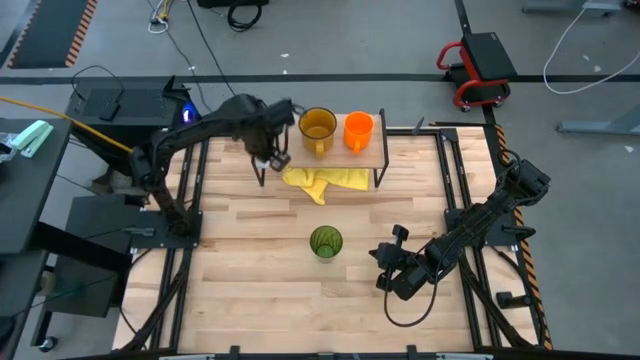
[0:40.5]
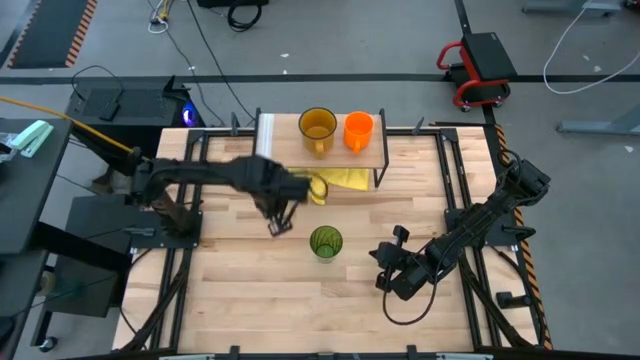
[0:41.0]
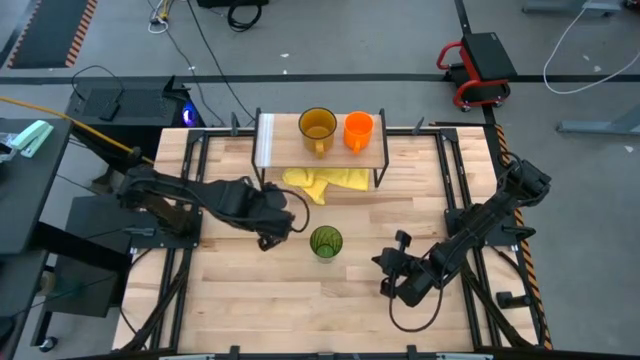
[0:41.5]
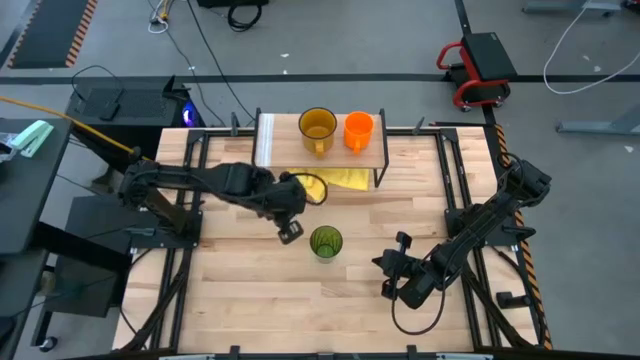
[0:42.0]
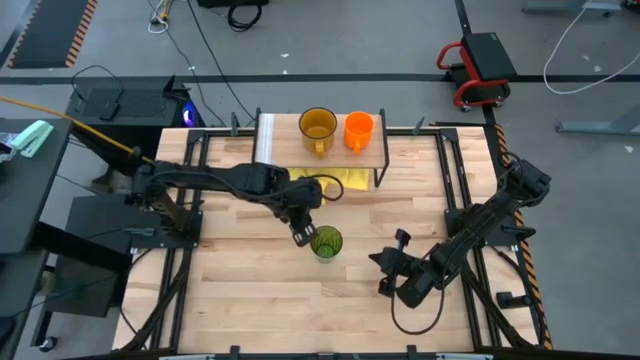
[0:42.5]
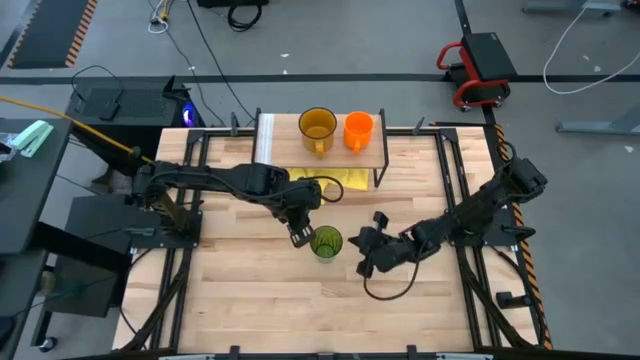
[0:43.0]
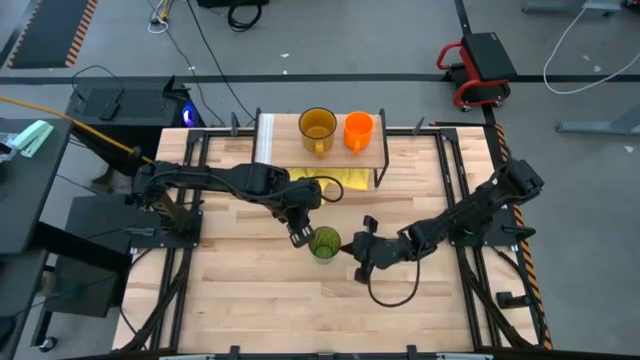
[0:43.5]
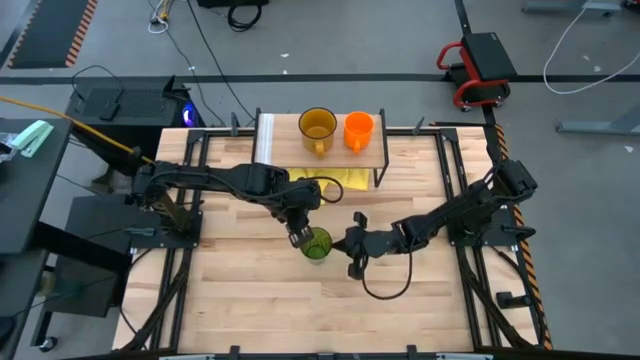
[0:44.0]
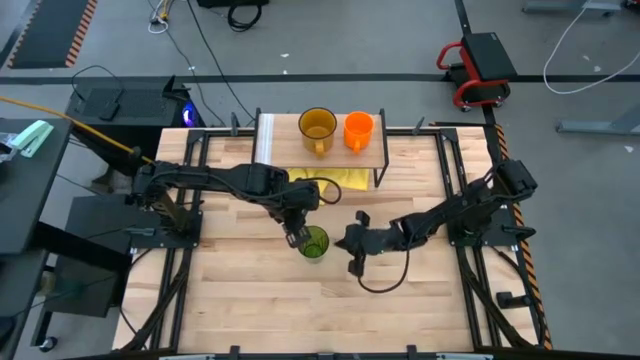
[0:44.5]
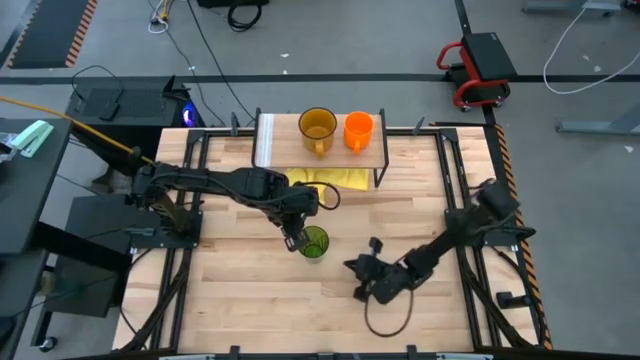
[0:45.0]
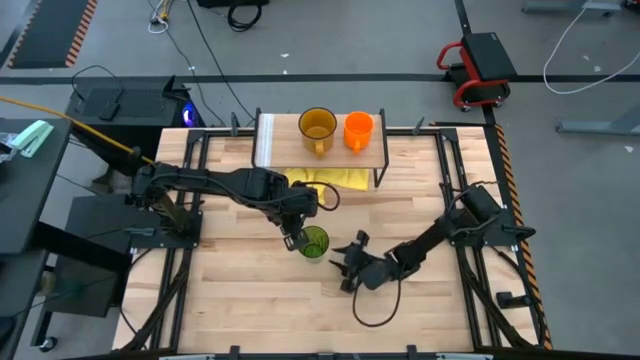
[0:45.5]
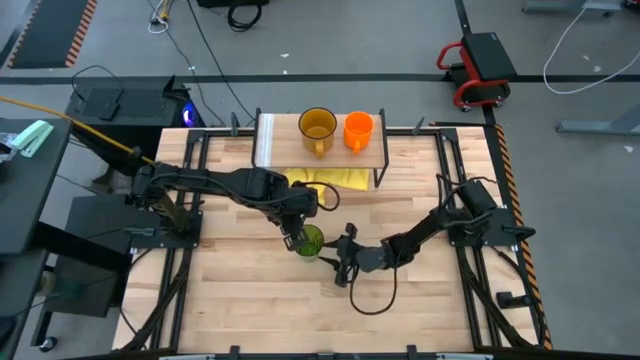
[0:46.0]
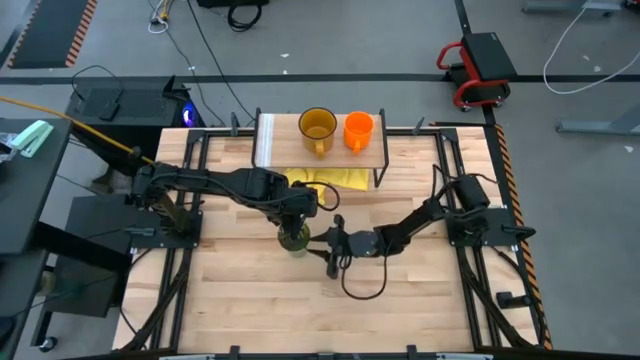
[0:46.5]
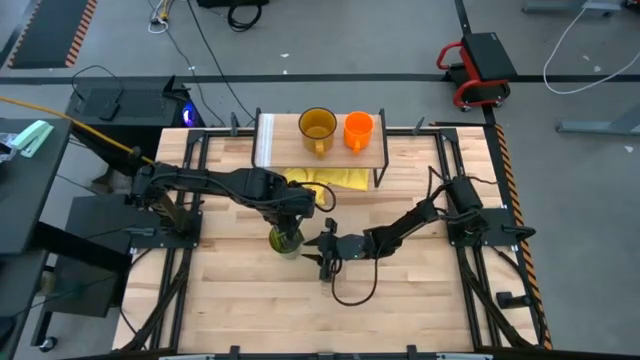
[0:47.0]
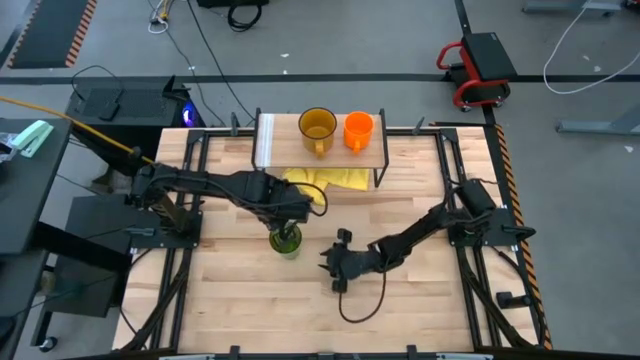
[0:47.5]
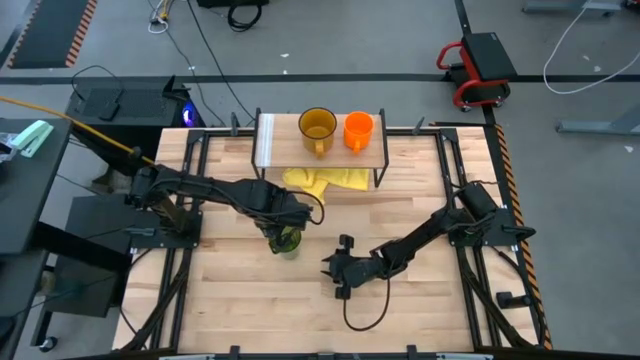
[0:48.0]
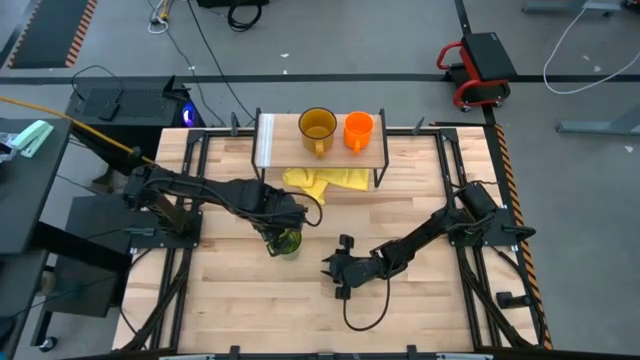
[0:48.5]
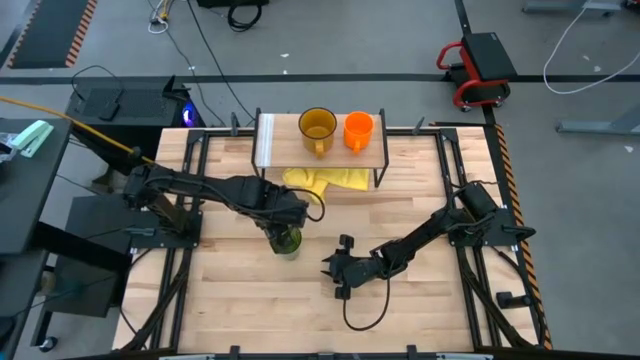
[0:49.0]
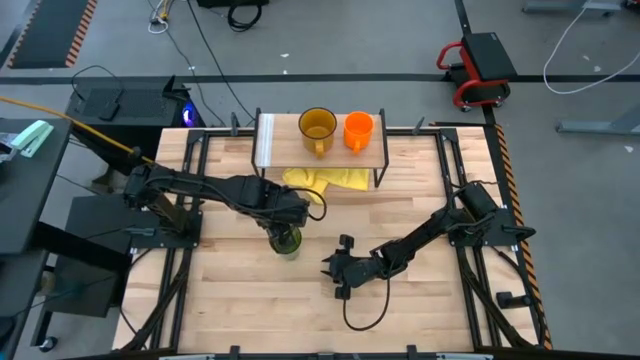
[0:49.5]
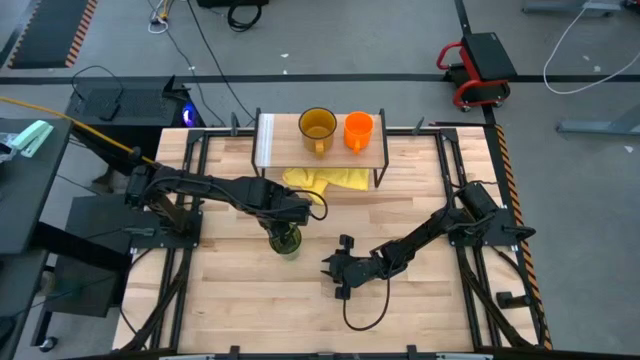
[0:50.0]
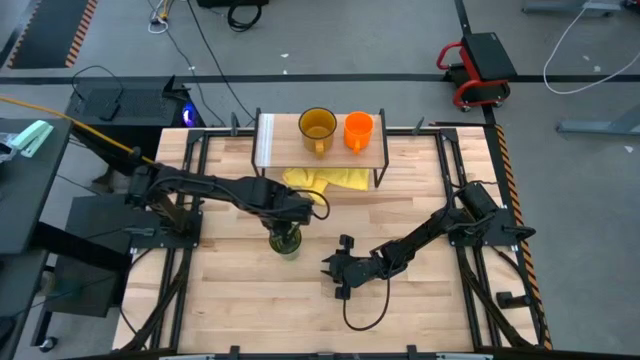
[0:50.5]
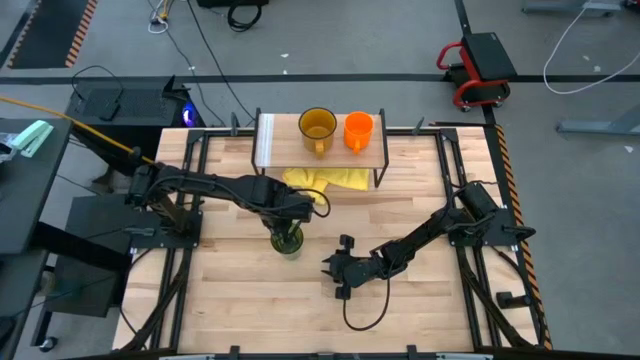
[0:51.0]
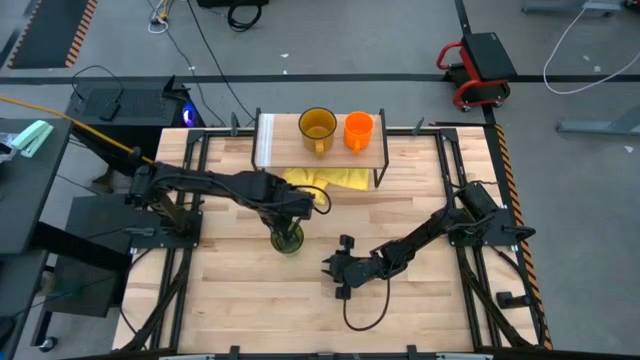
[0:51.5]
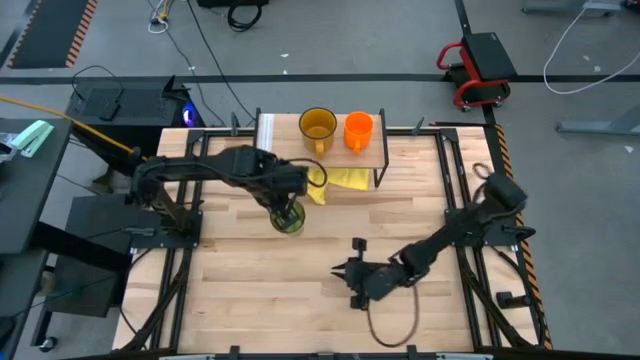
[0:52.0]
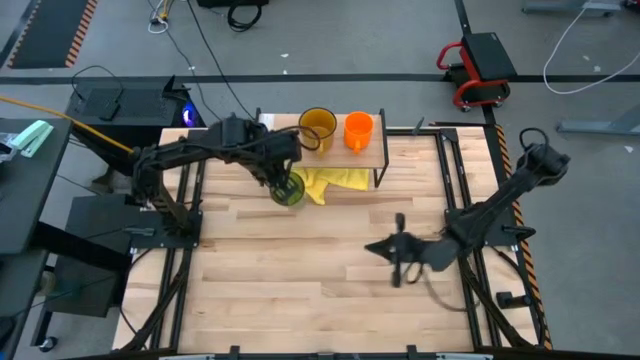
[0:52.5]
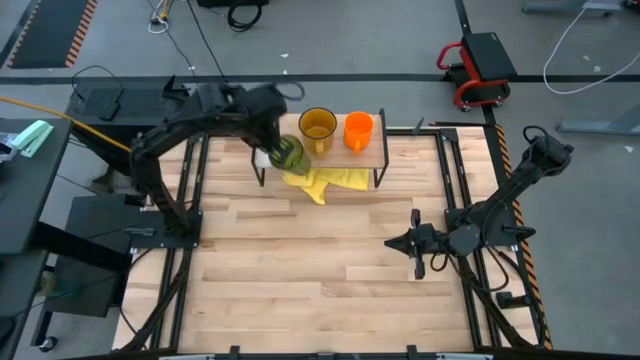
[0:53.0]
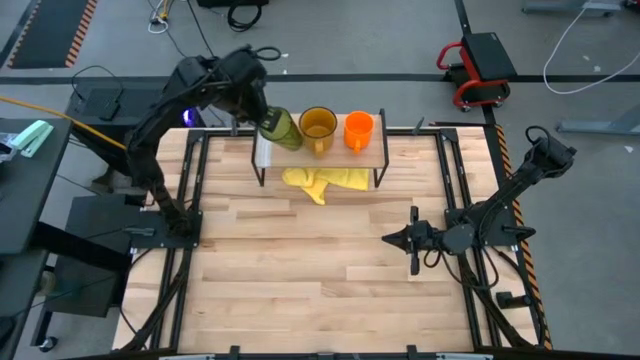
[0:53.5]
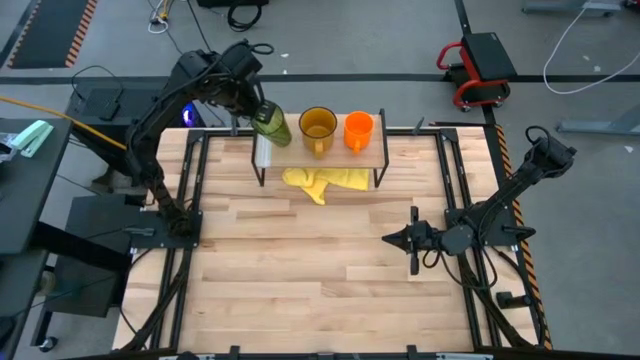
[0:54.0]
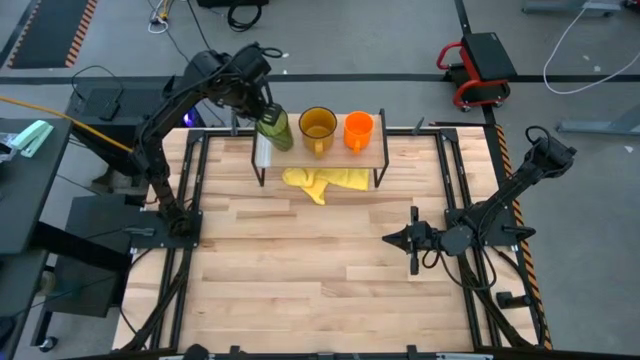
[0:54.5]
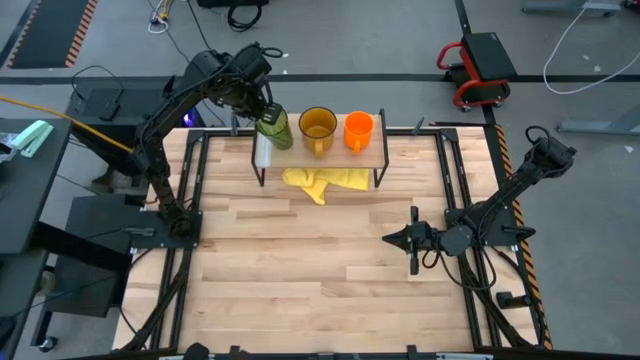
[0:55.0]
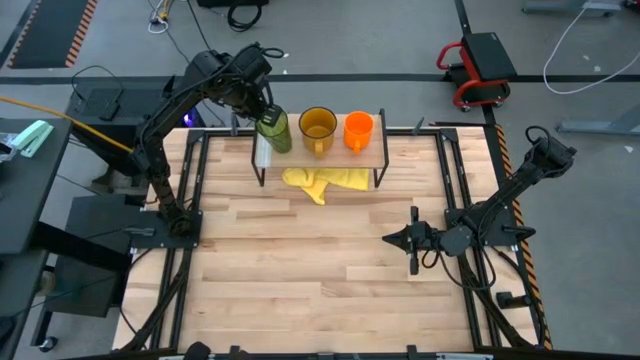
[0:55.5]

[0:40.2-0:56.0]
Task: Stack small to large cups/mugs on shelf
Put the green cup on the shelf

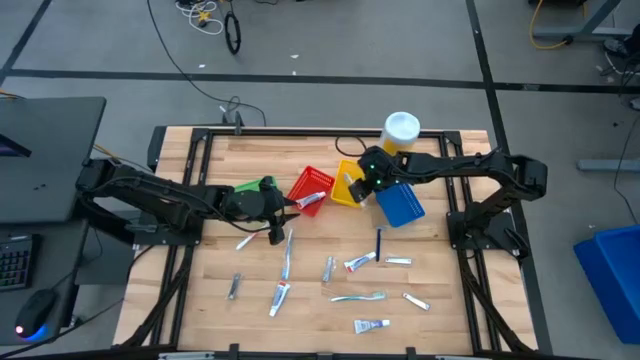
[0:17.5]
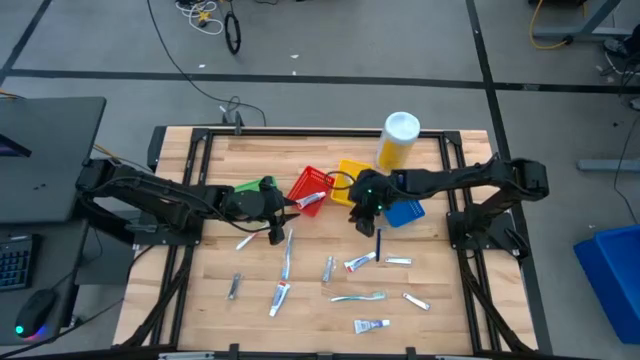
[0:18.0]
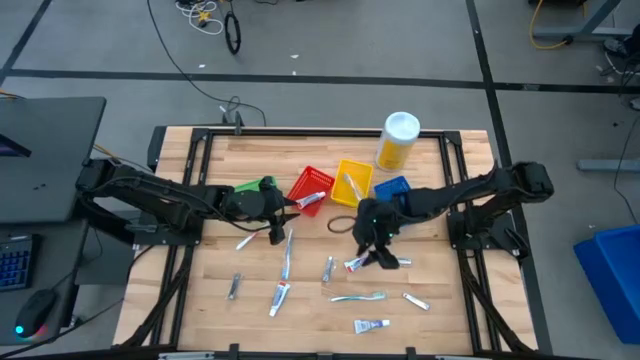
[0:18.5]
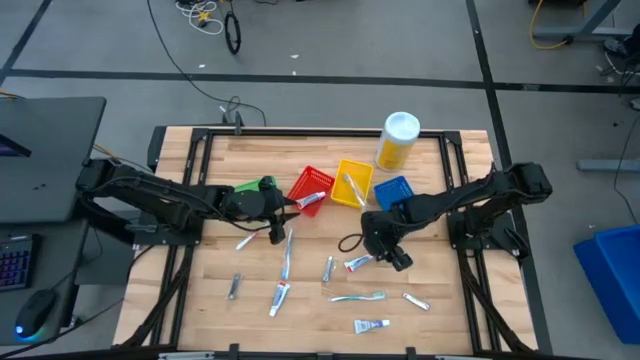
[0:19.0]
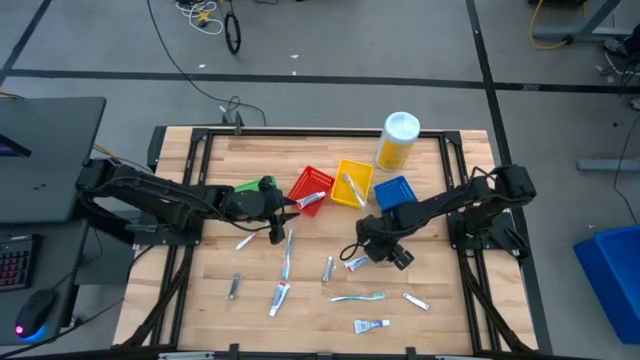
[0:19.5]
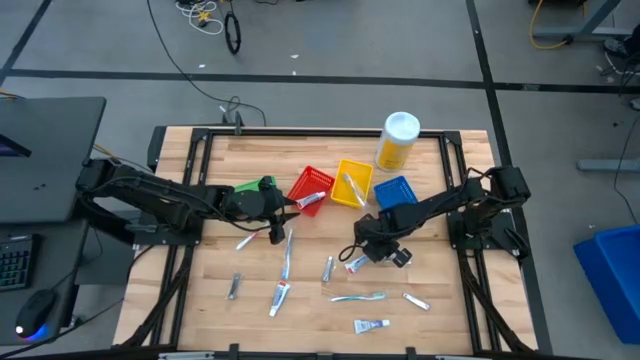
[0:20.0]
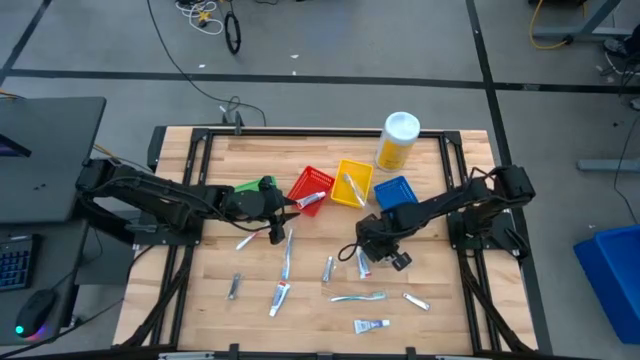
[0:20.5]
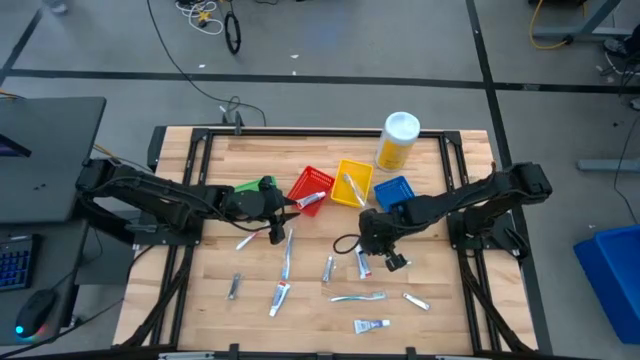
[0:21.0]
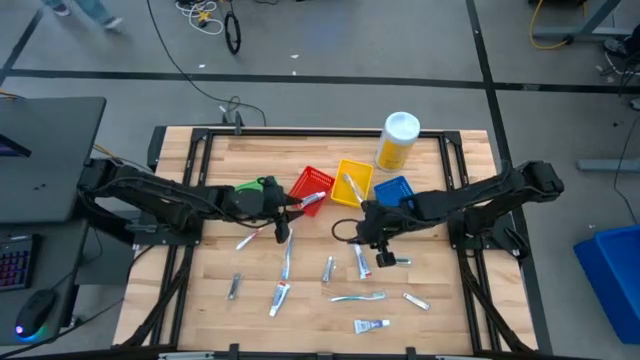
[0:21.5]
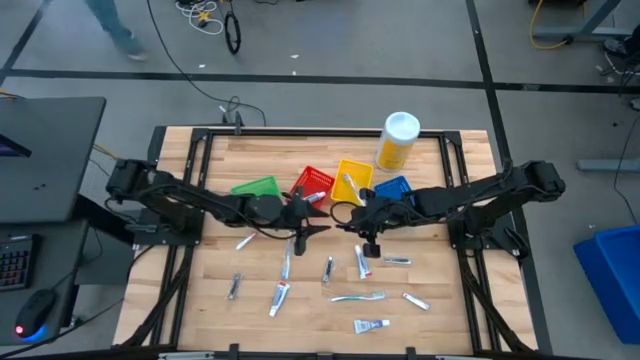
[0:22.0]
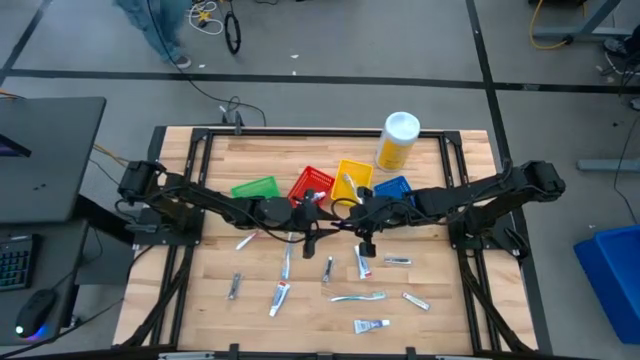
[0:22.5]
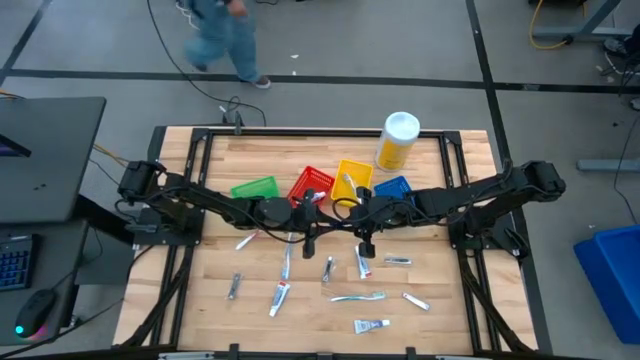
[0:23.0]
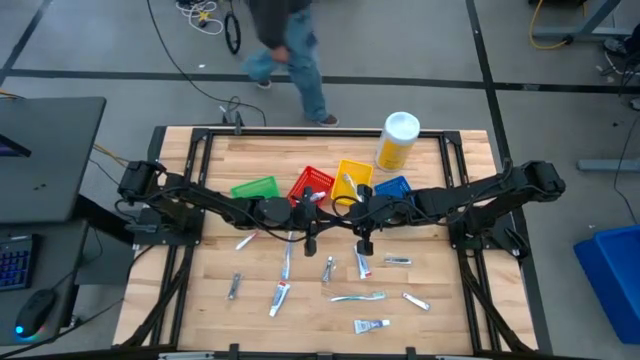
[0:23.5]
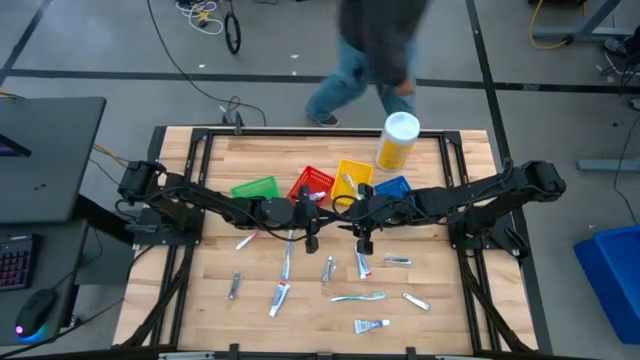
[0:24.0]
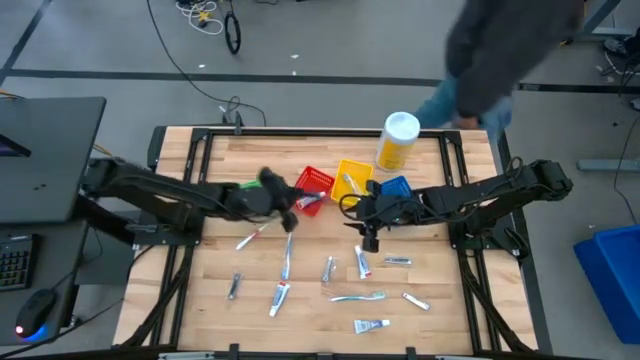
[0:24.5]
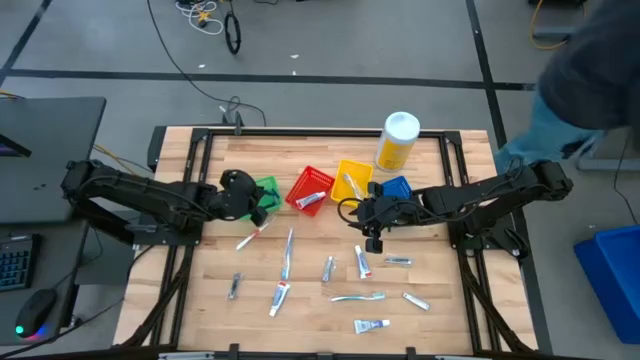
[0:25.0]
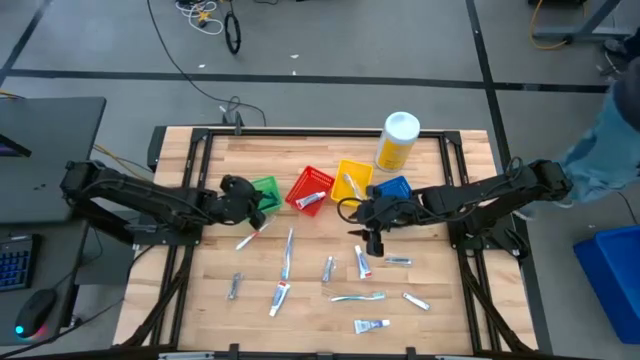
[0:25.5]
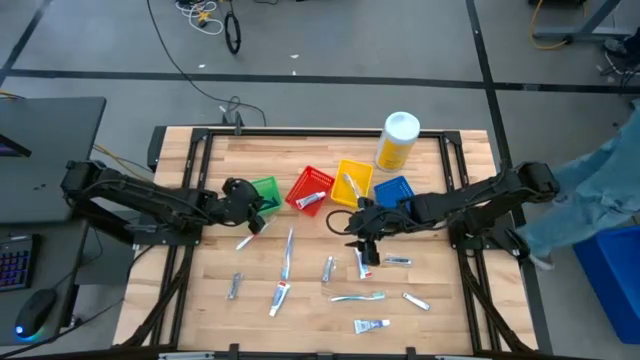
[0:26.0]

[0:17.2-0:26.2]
Task: Pick & Place Travel size toiletries
Put the blue razor into the green bin
